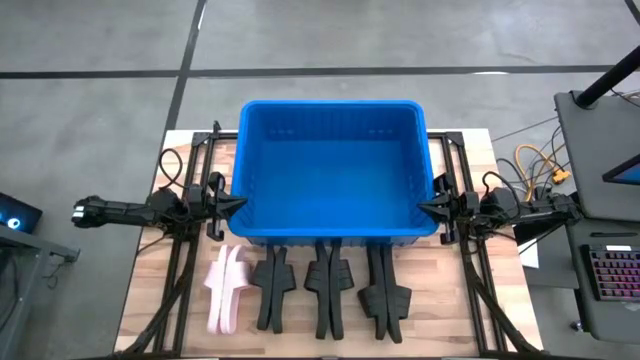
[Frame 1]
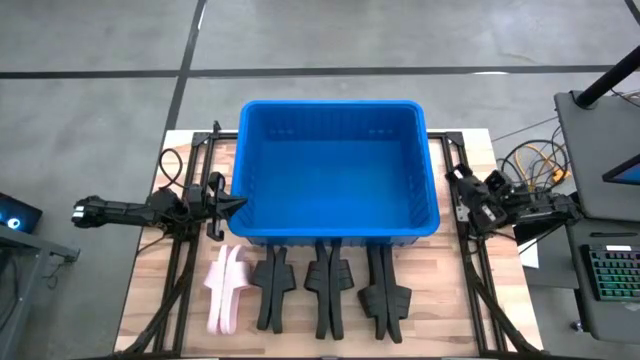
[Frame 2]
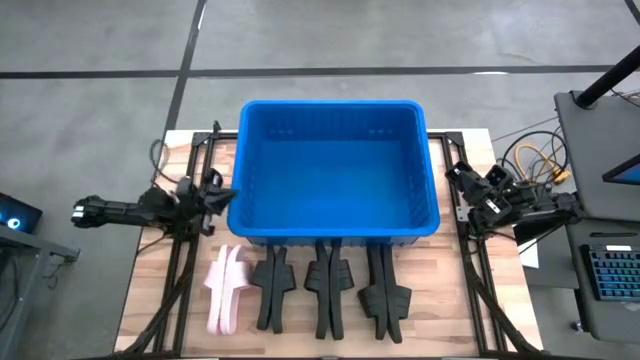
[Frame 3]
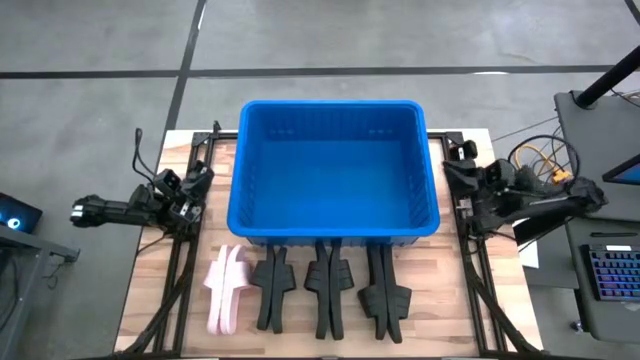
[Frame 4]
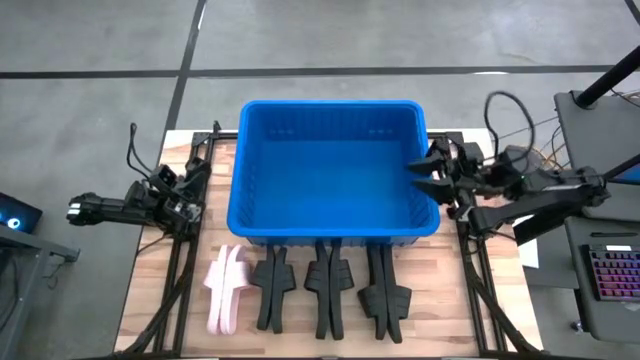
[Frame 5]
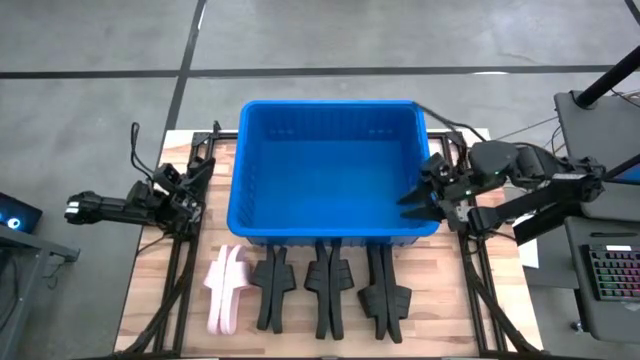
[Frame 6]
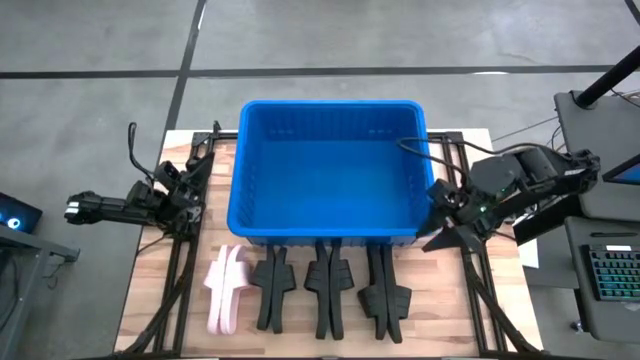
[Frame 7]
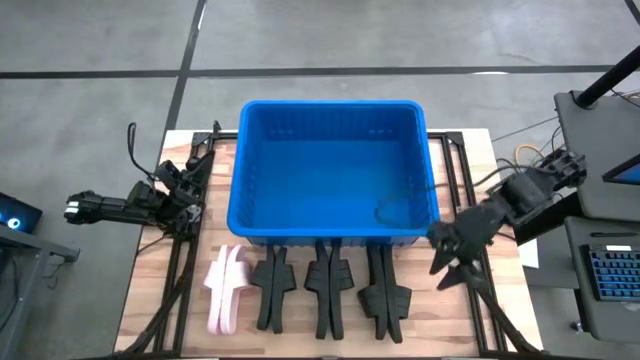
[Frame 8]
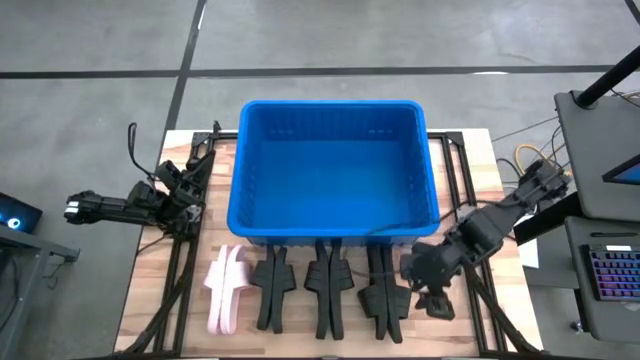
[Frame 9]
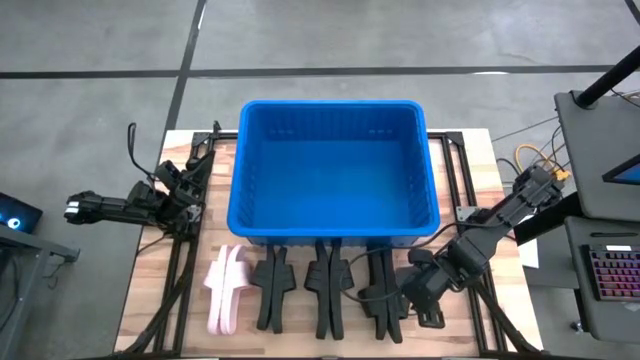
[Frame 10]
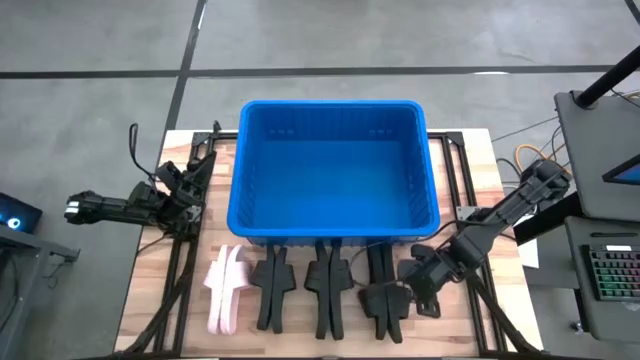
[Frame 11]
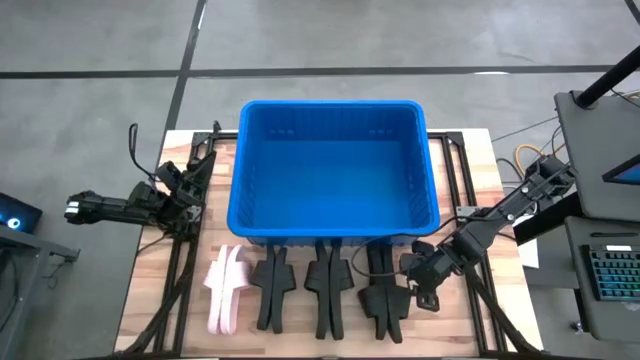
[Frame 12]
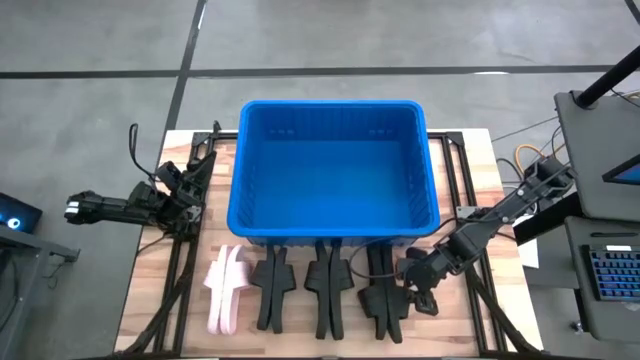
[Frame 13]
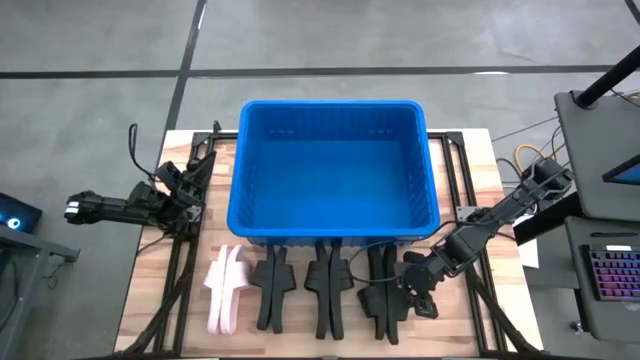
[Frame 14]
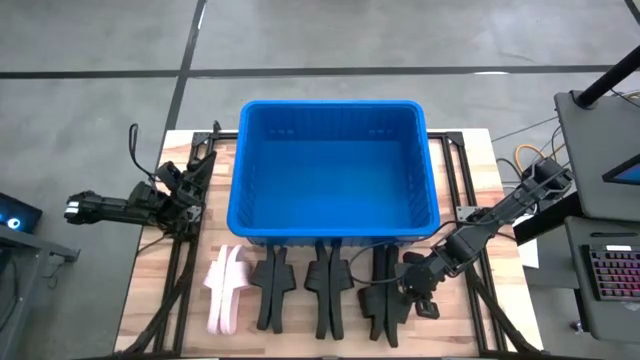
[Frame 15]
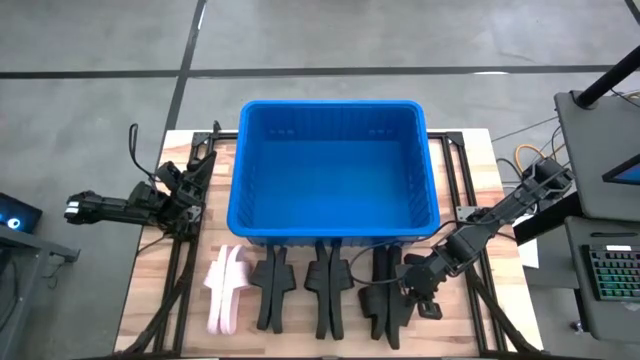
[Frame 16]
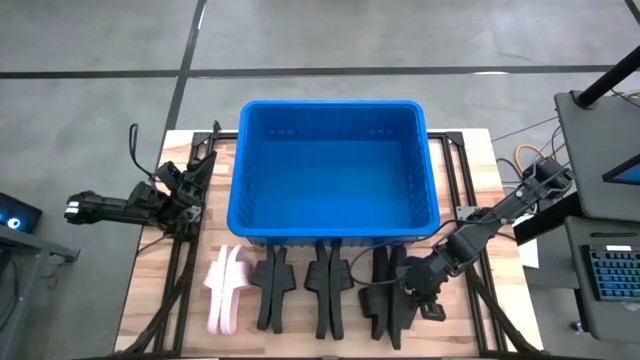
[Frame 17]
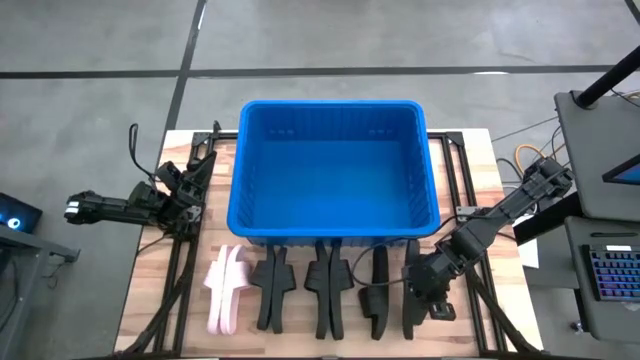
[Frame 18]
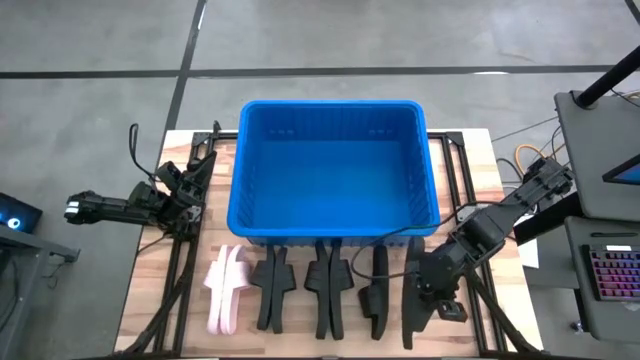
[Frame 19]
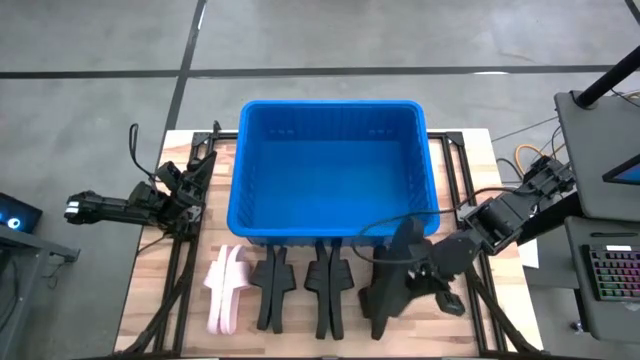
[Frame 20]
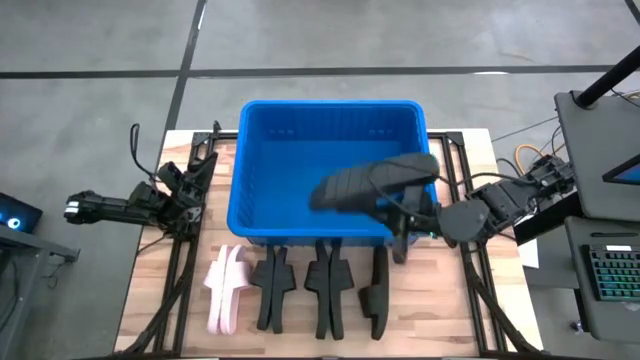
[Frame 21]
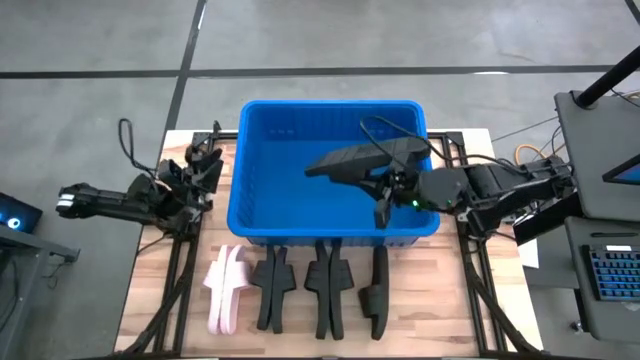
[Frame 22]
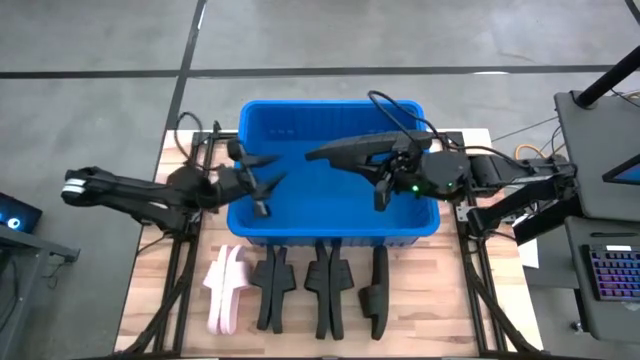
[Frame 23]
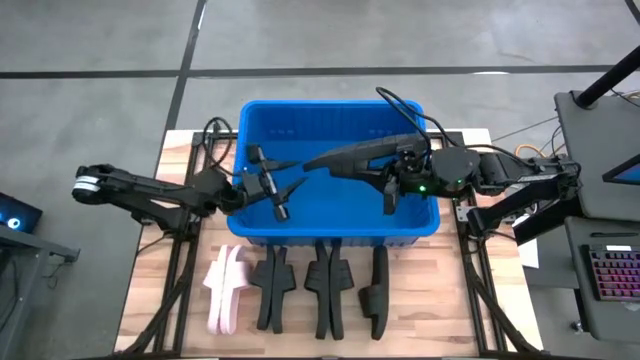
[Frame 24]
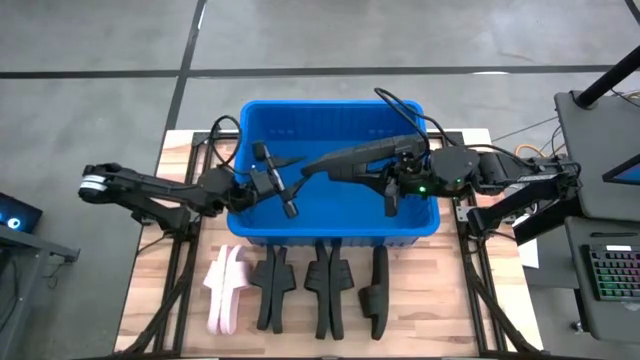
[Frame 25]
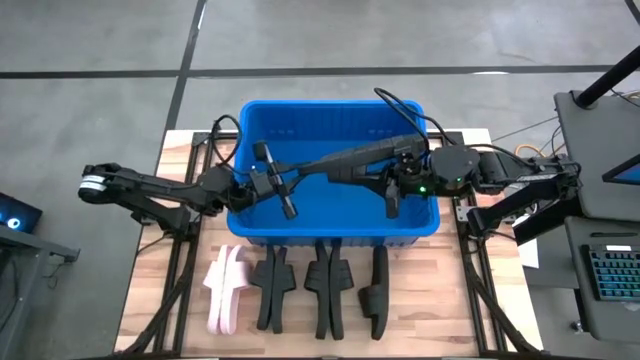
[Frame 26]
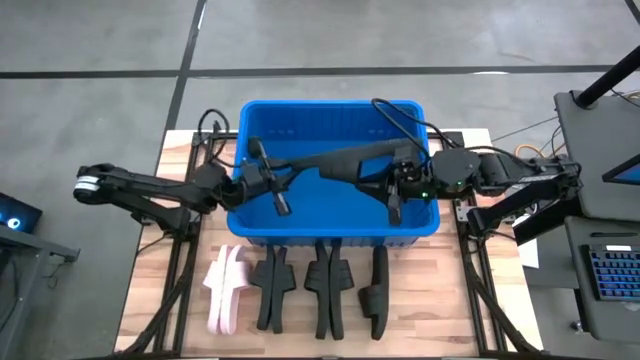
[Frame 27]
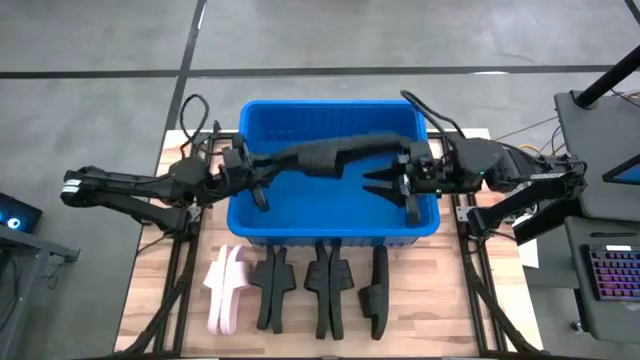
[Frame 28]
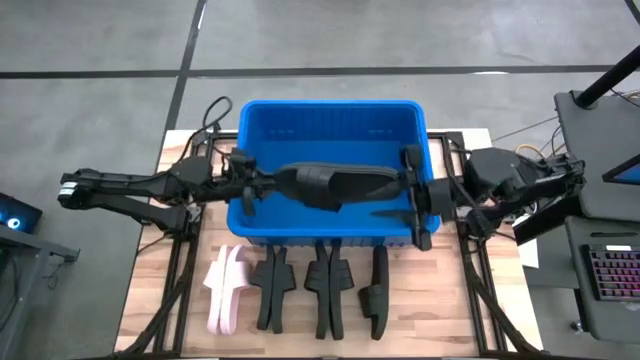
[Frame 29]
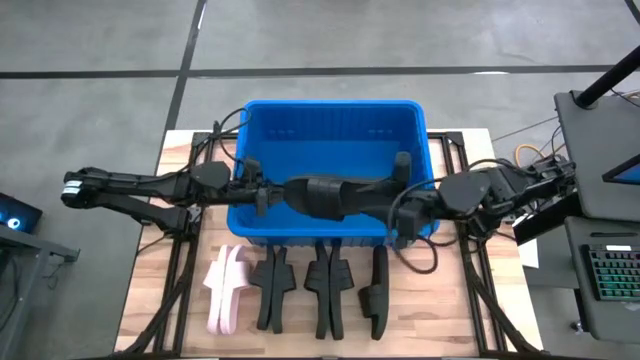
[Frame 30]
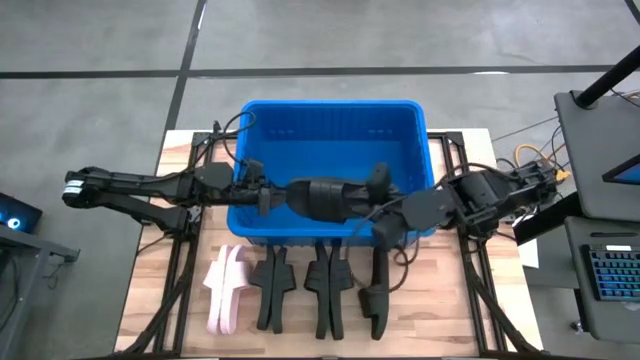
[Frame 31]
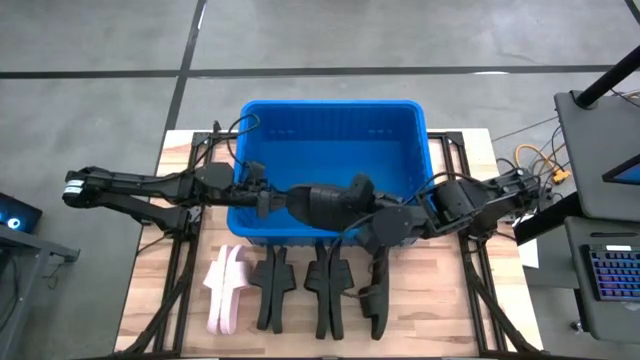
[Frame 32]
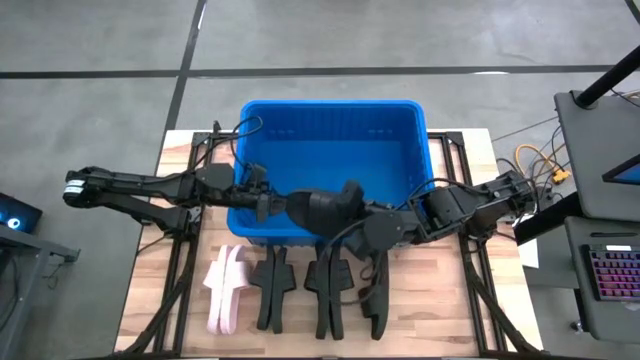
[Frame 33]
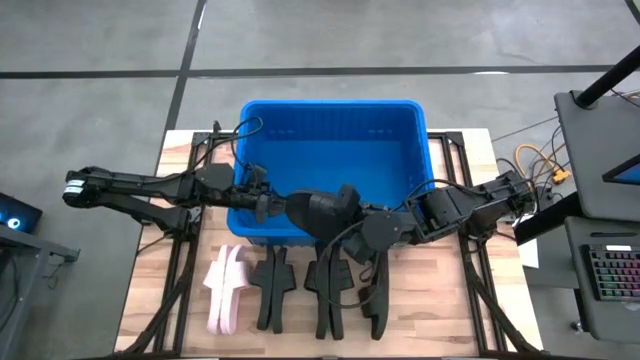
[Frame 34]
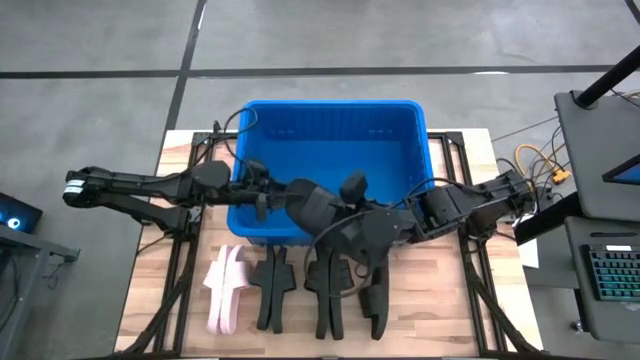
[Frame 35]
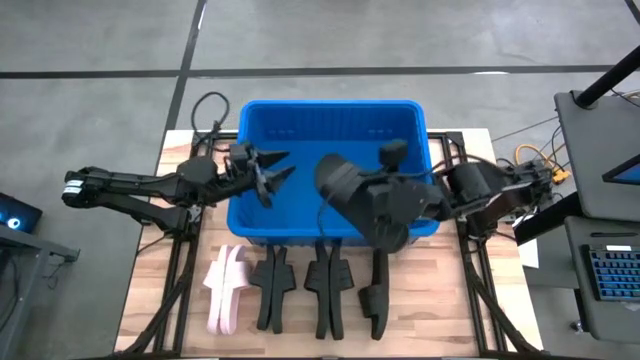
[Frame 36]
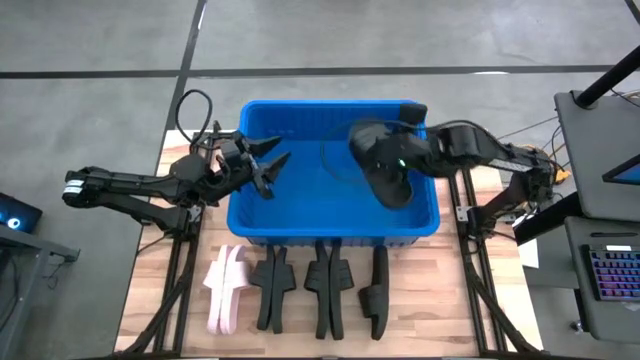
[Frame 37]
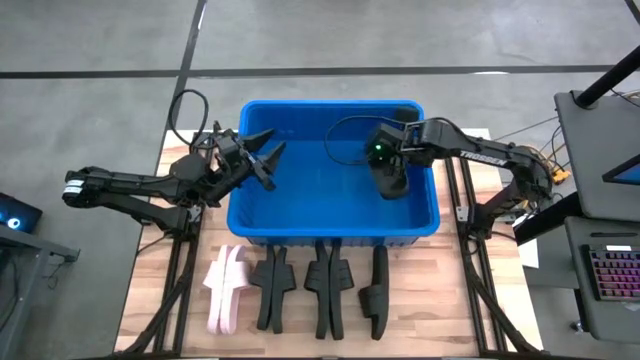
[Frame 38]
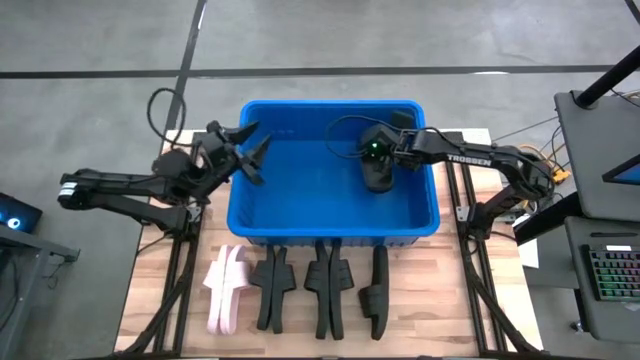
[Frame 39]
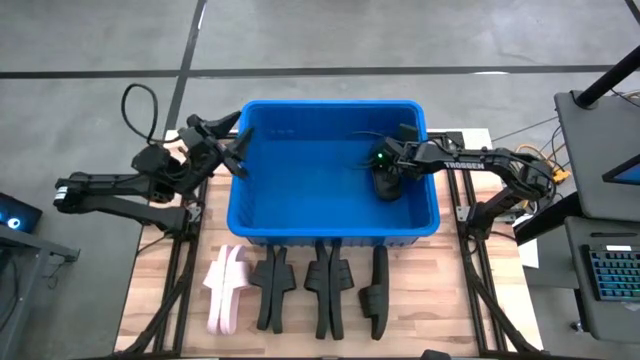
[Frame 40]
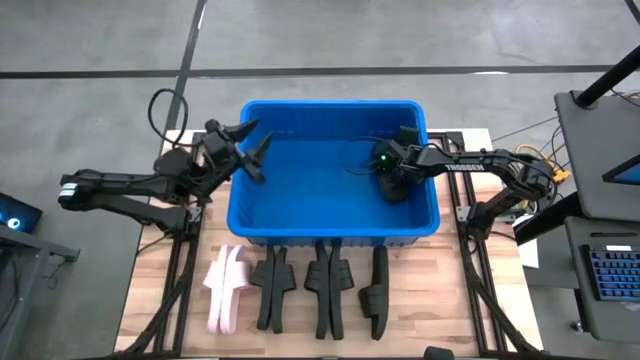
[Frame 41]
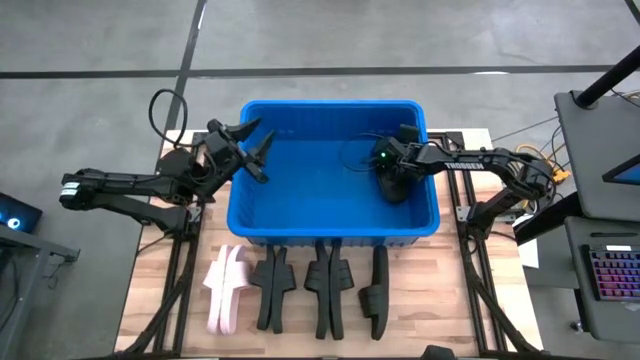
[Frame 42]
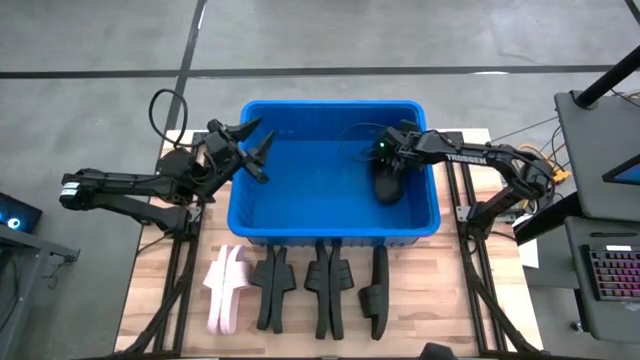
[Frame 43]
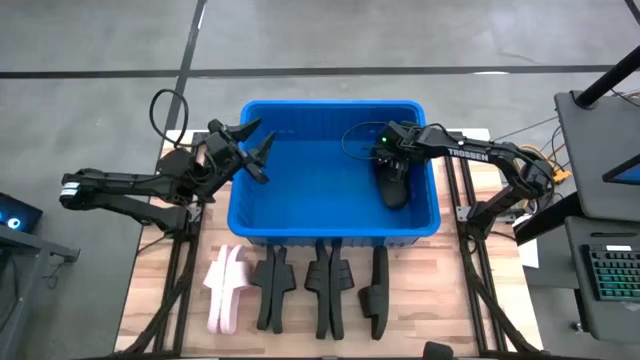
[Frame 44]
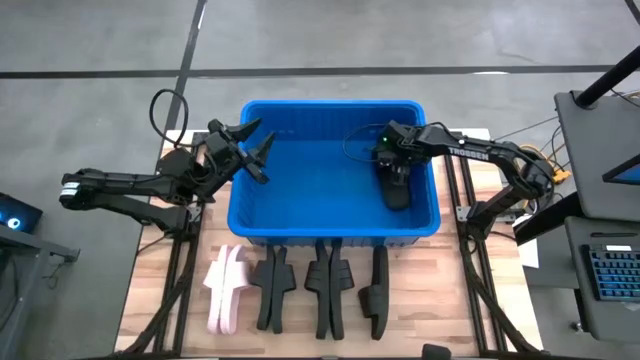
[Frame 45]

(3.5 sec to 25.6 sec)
Task: Pick and place slides into bin
Put the black slide into the bin
